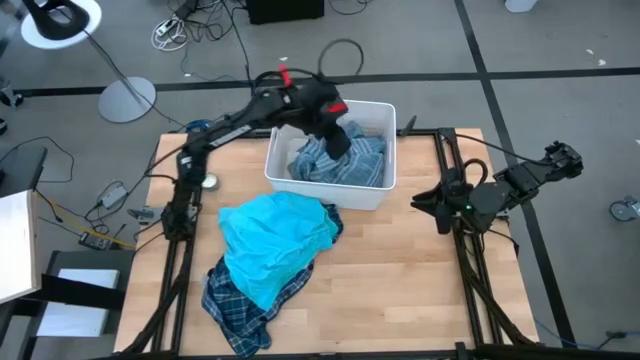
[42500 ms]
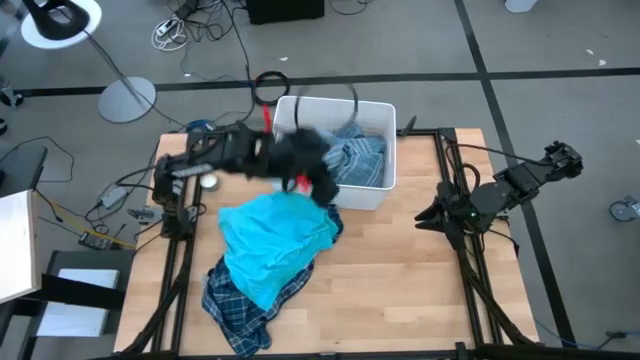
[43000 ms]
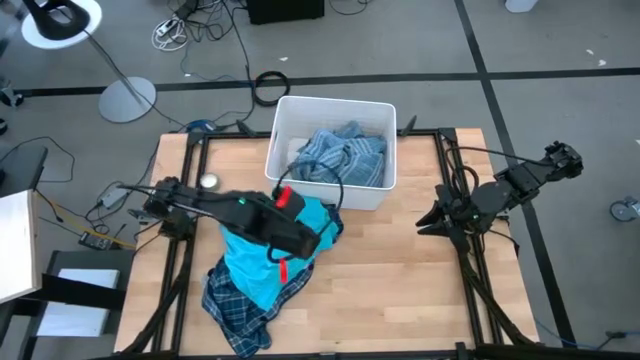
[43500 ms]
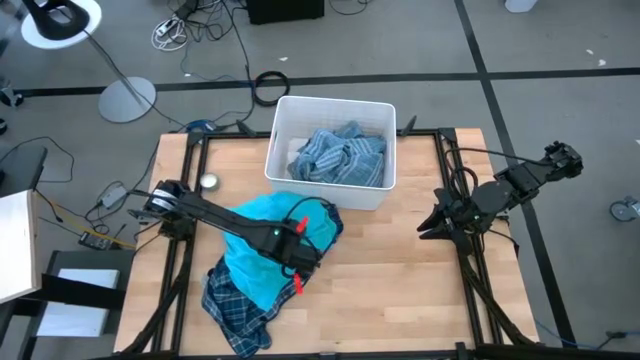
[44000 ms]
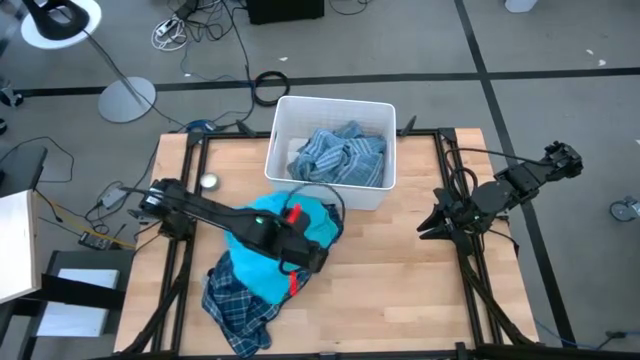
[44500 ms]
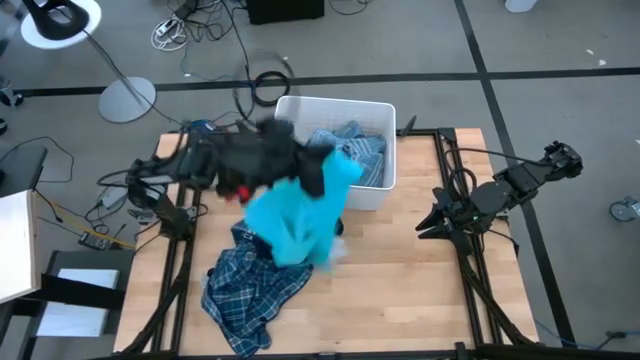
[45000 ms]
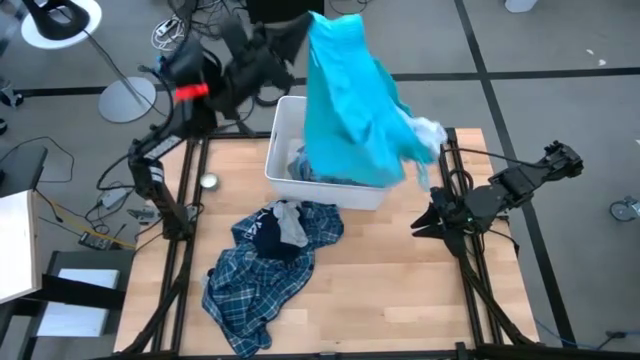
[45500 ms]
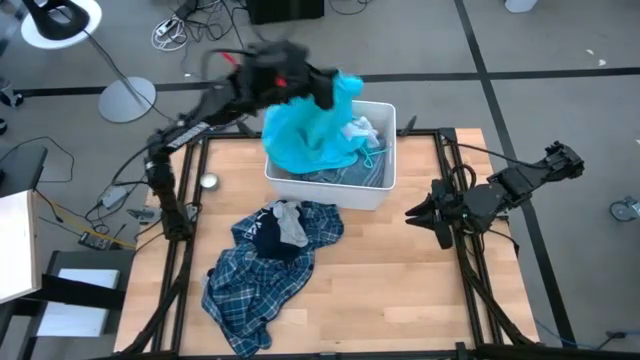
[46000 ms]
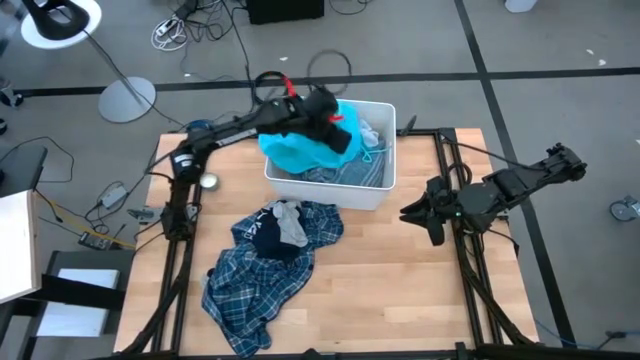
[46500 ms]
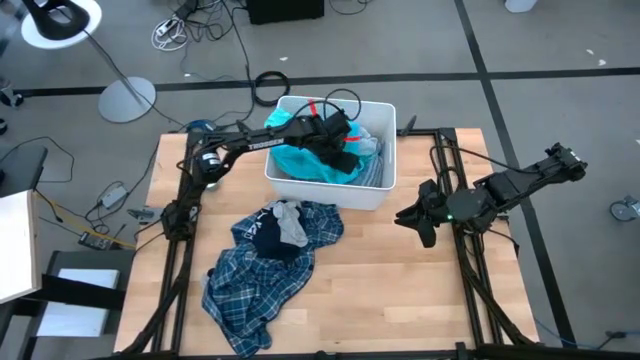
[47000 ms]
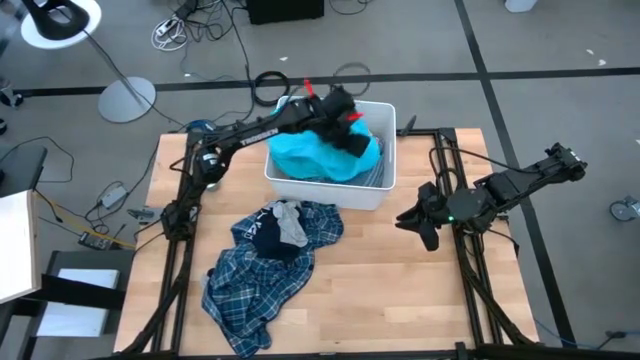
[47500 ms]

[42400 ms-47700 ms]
Task: Sort clothes
Put the blue shorts into the white bin

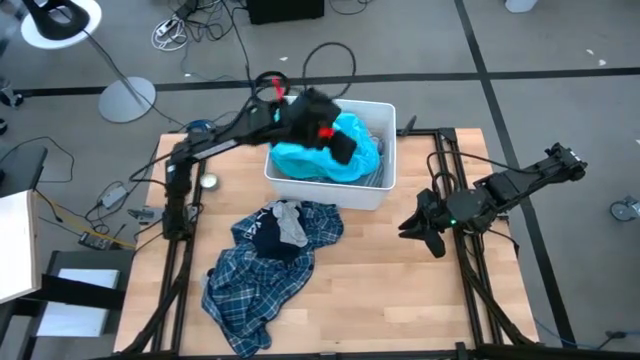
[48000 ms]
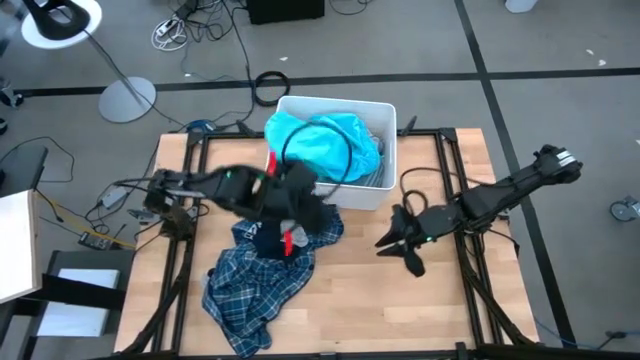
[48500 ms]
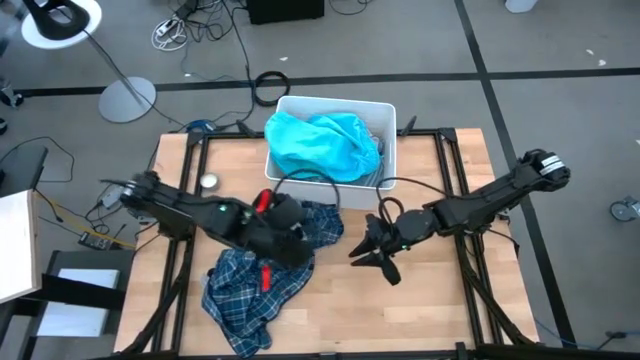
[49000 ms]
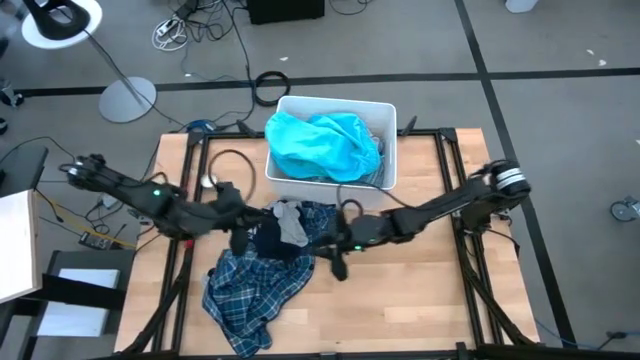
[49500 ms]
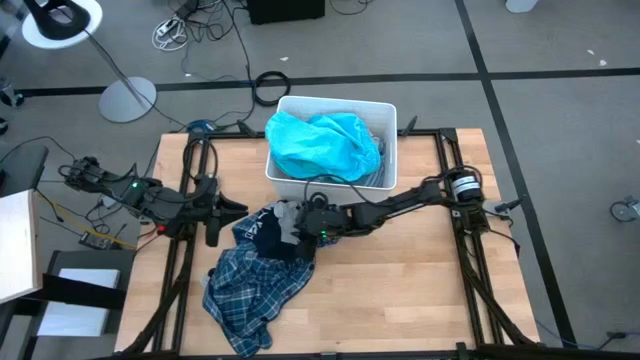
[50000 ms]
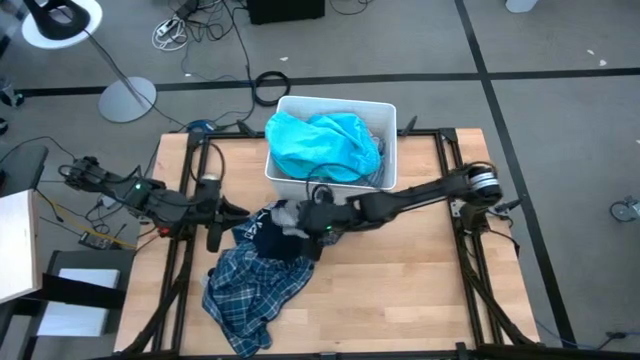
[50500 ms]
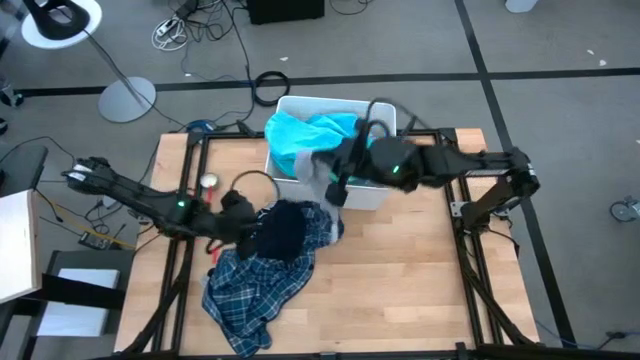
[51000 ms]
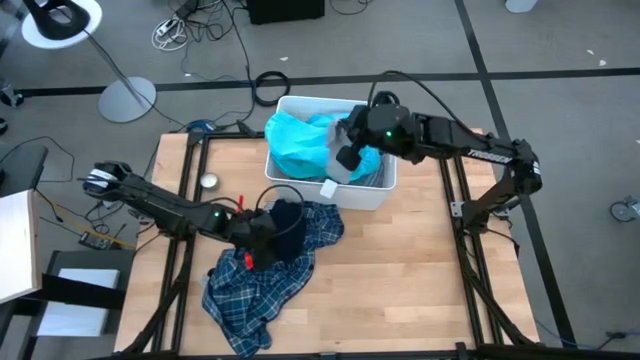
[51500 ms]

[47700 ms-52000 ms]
Put the gray sock into the white bin

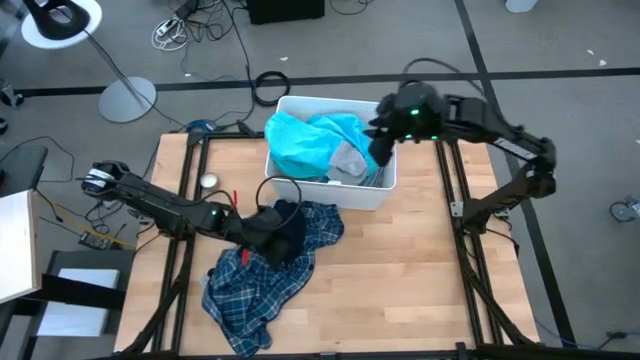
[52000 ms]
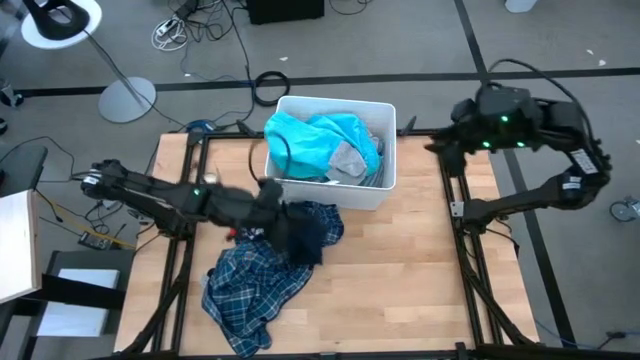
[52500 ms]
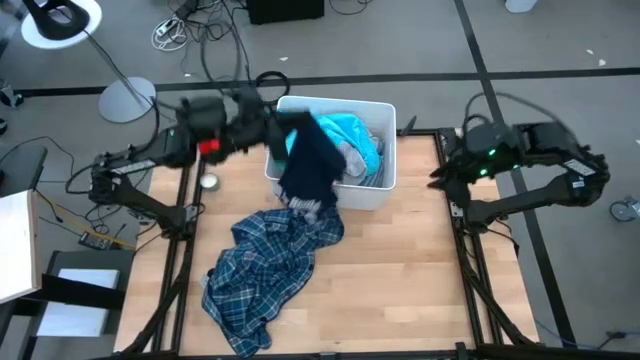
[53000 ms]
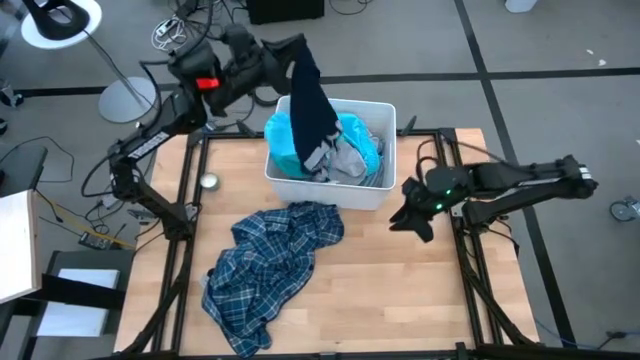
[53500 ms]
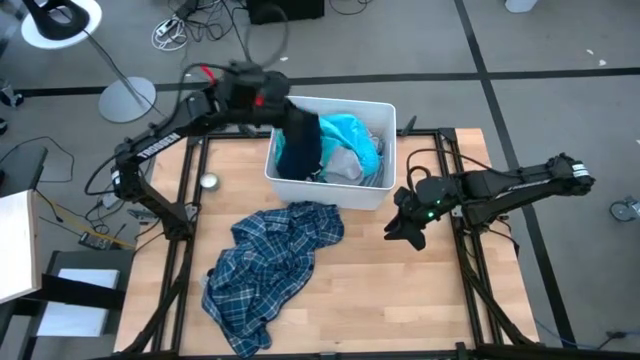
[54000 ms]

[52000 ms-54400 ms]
Put the black boxer into the white bin

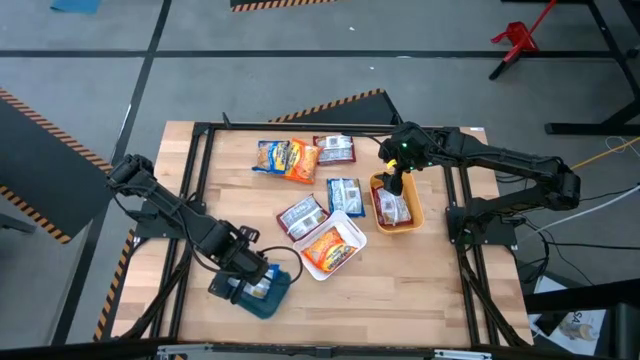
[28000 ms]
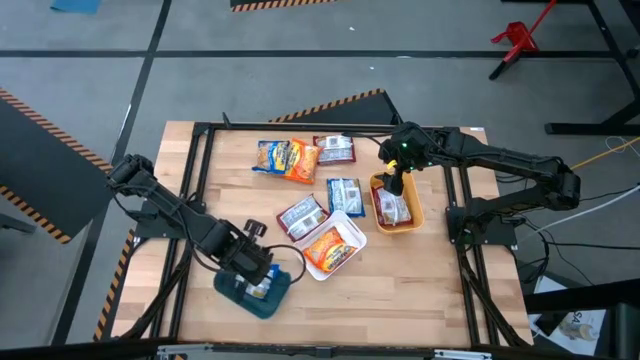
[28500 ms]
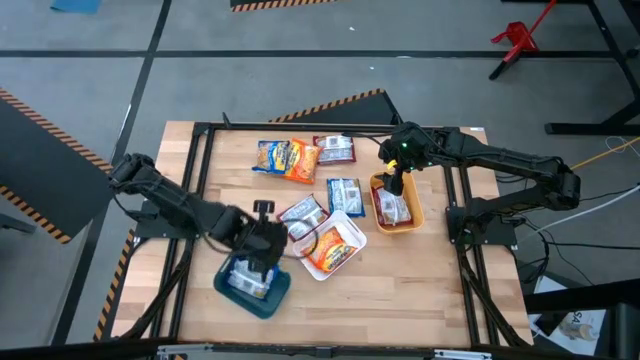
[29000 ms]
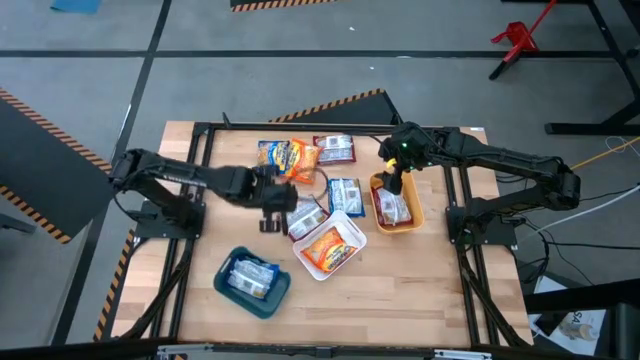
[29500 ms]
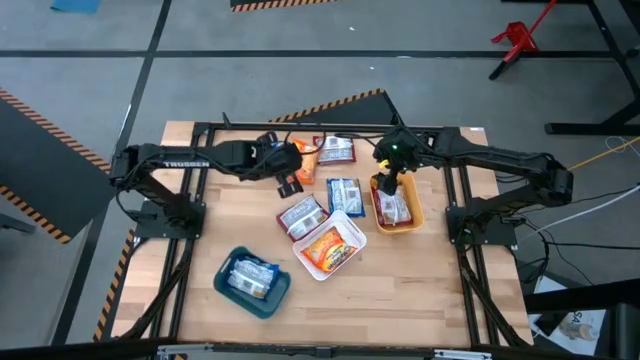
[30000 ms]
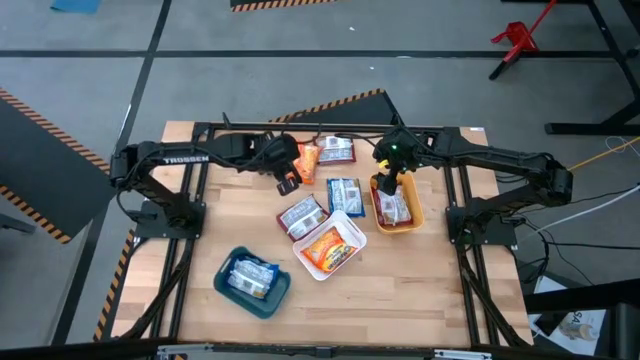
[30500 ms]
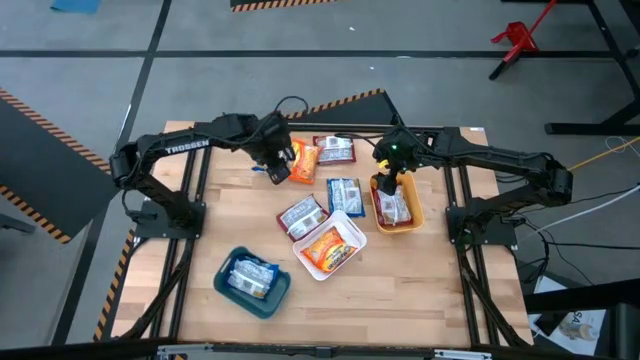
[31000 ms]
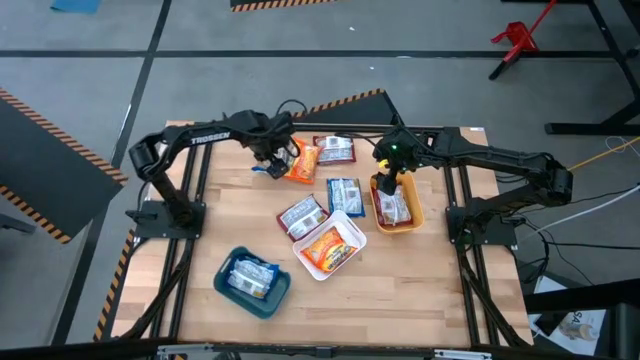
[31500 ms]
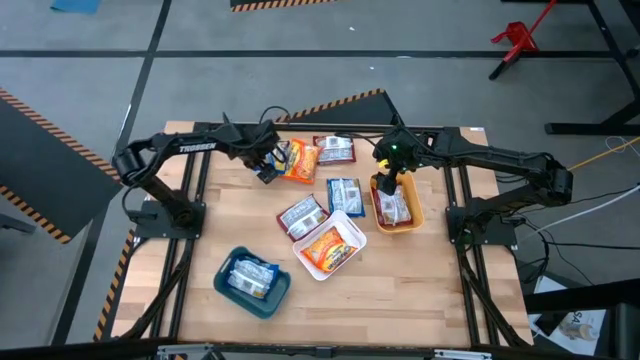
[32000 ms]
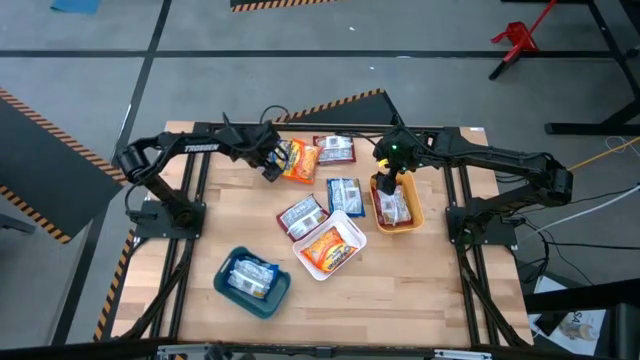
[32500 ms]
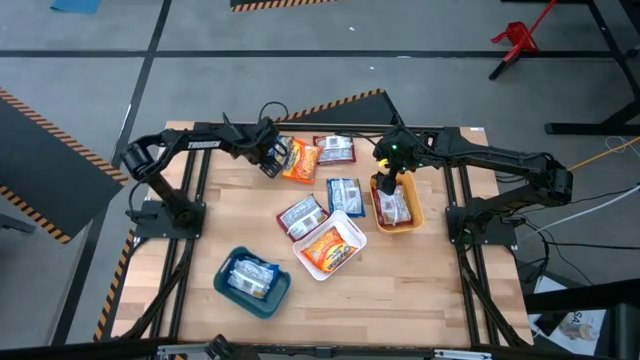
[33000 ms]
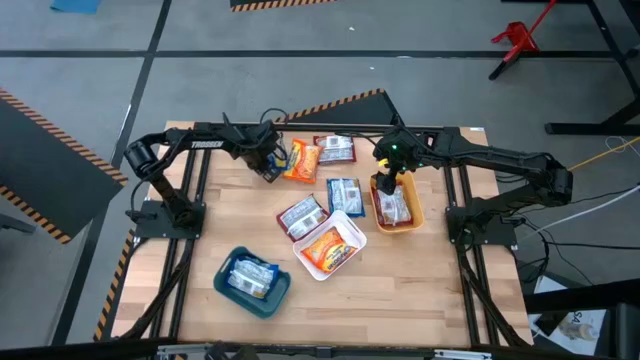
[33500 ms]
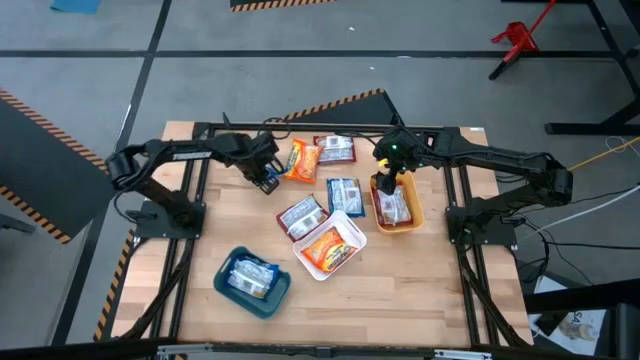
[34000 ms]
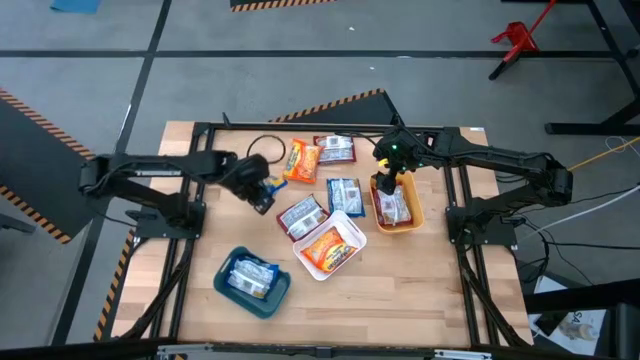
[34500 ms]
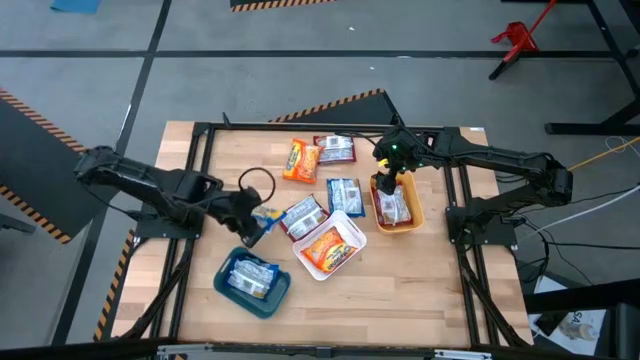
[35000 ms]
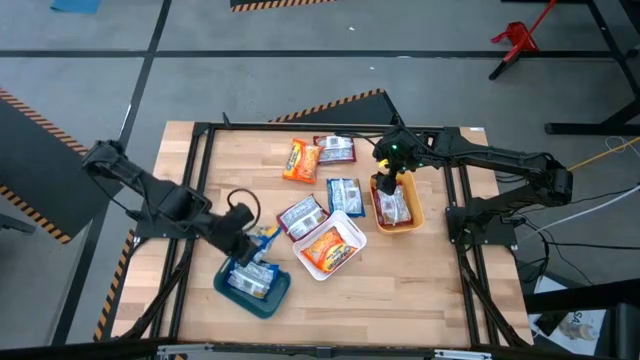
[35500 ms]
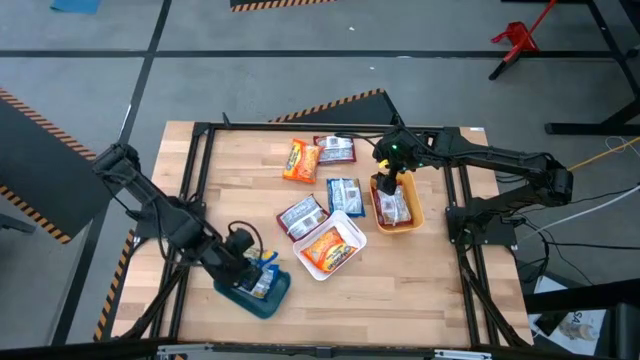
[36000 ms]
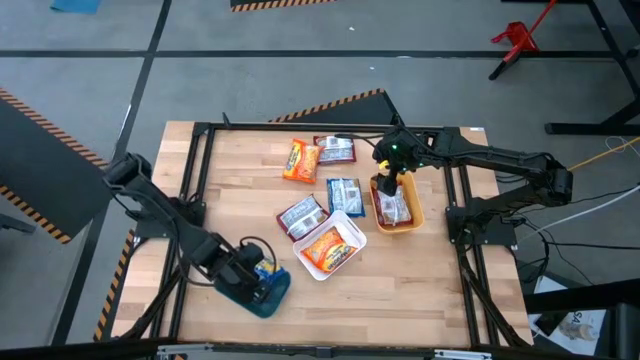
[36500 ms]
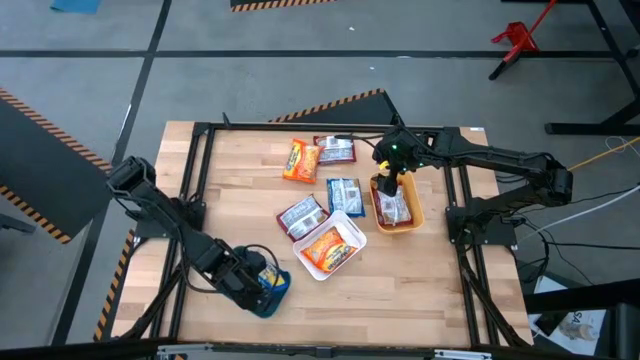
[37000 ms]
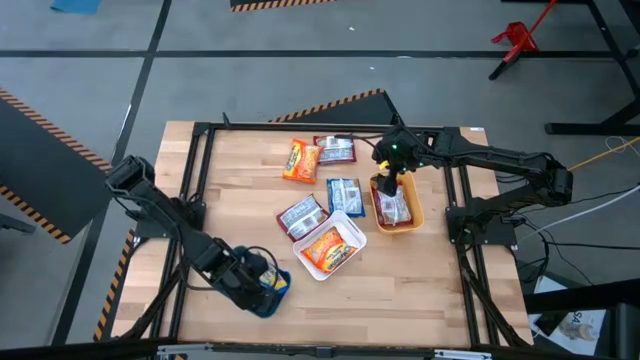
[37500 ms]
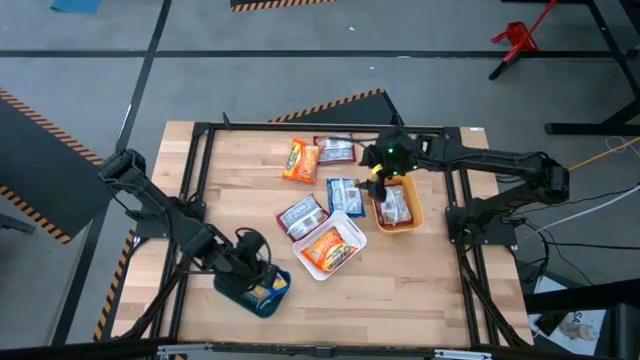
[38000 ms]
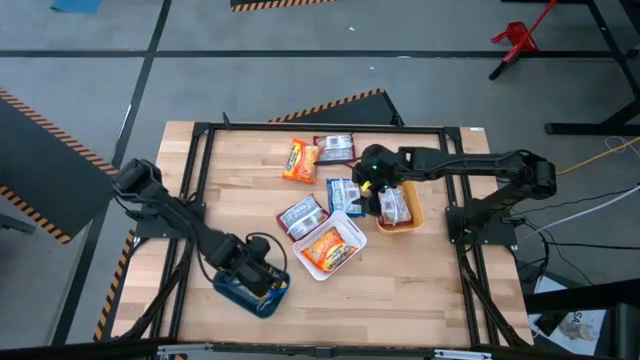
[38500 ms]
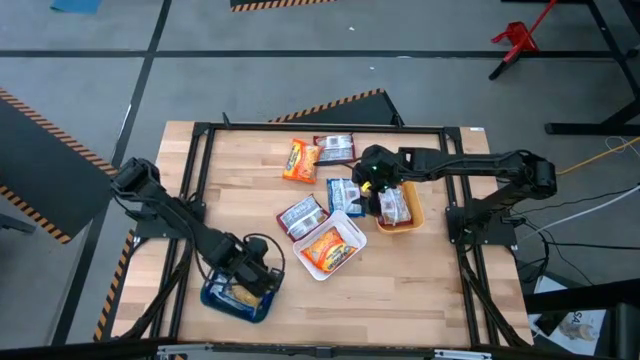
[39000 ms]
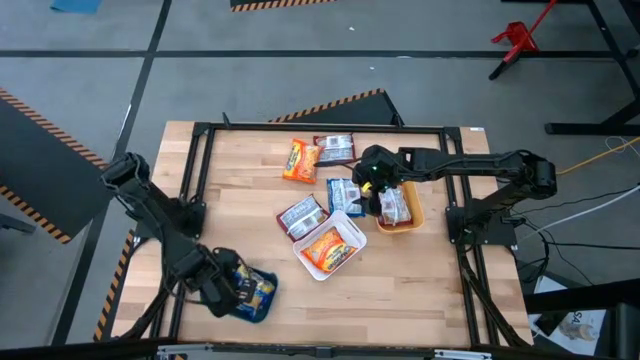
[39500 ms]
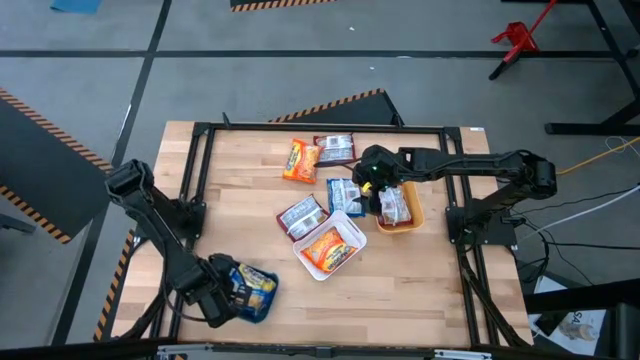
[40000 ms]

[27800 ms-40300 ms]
Task: Sort Maruchan noodles
Put the left blue noodle pack into the green bin
